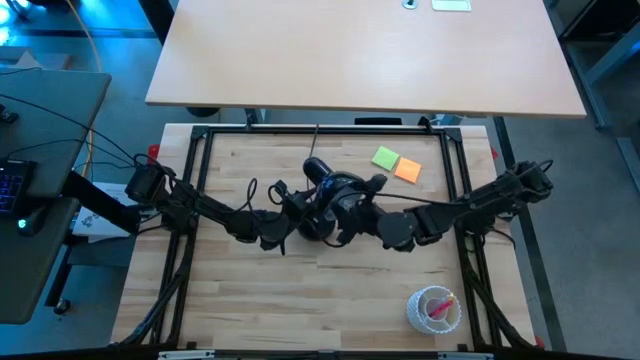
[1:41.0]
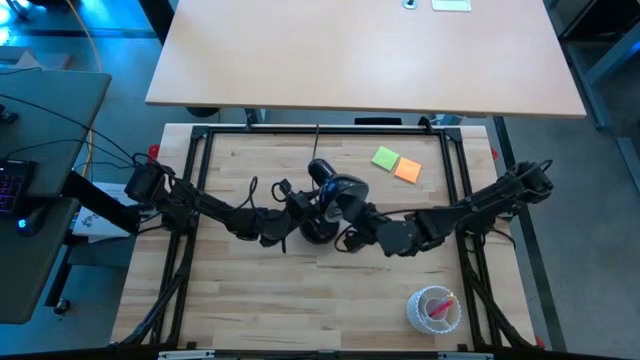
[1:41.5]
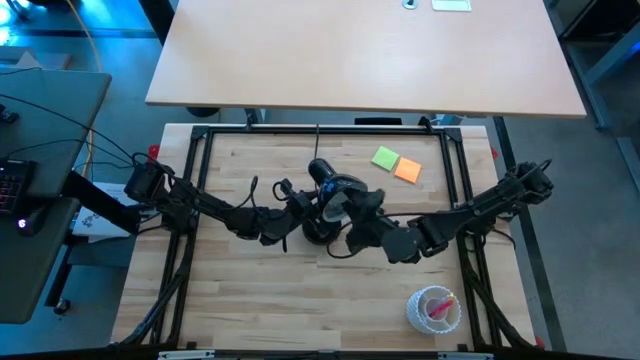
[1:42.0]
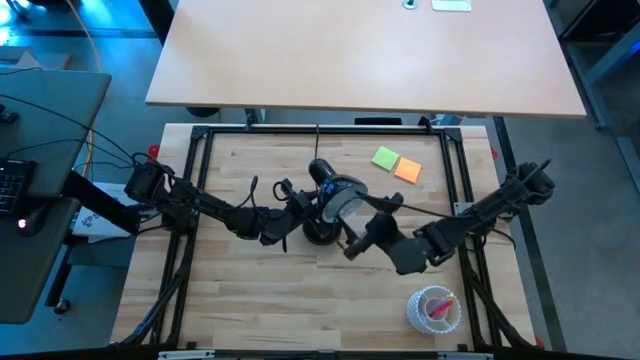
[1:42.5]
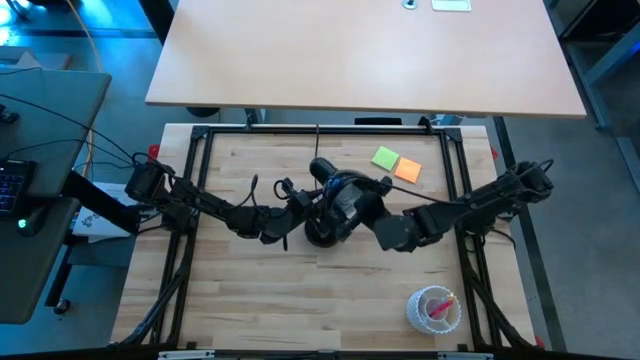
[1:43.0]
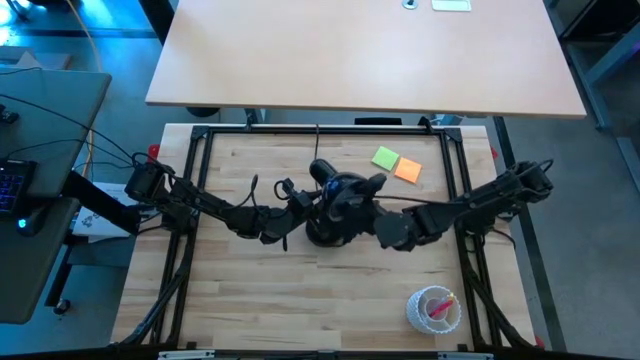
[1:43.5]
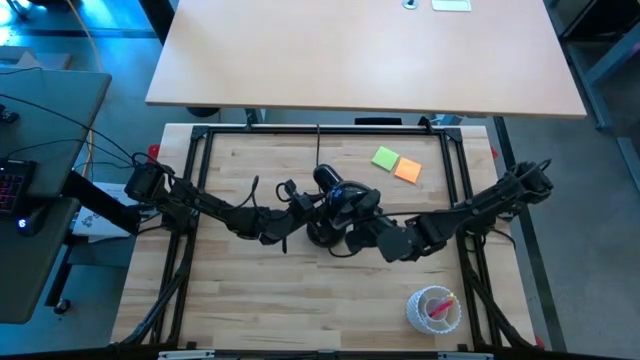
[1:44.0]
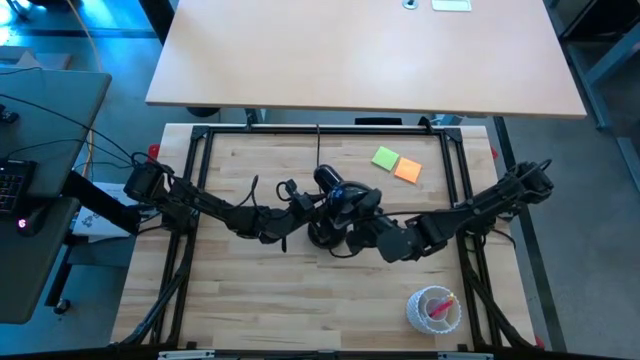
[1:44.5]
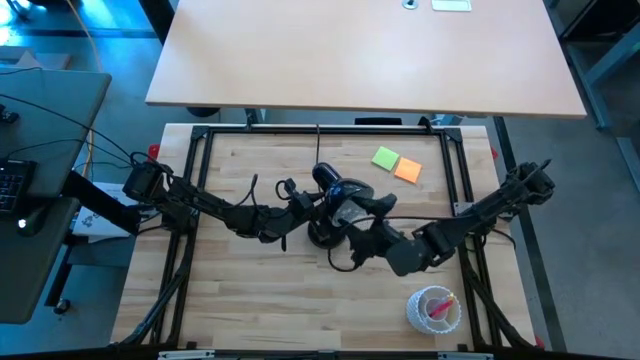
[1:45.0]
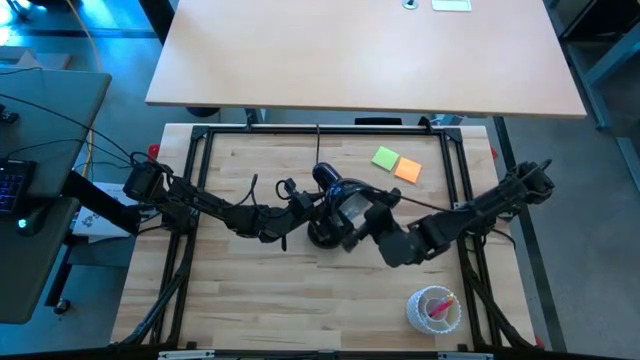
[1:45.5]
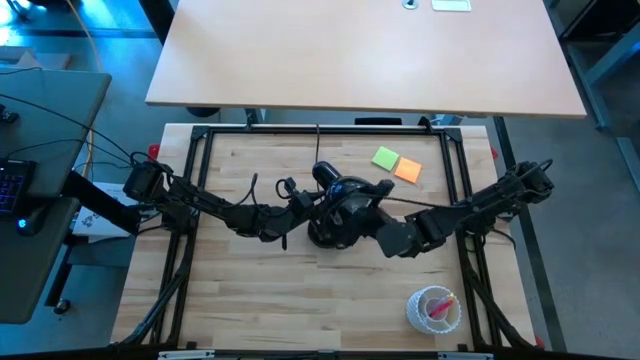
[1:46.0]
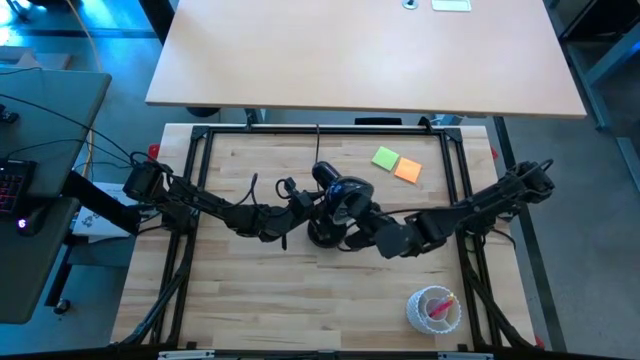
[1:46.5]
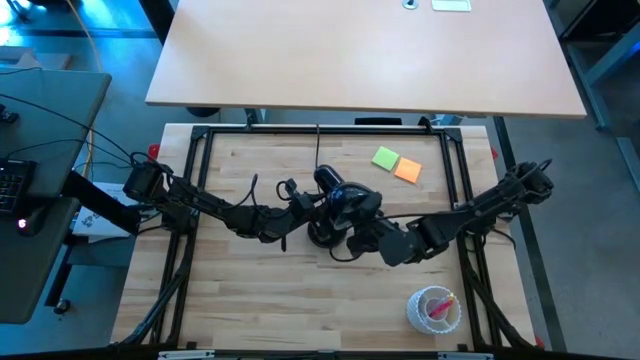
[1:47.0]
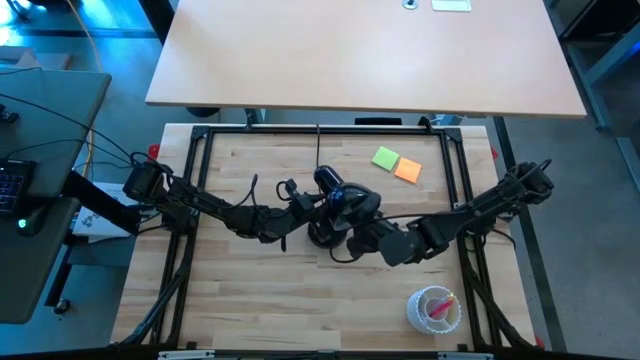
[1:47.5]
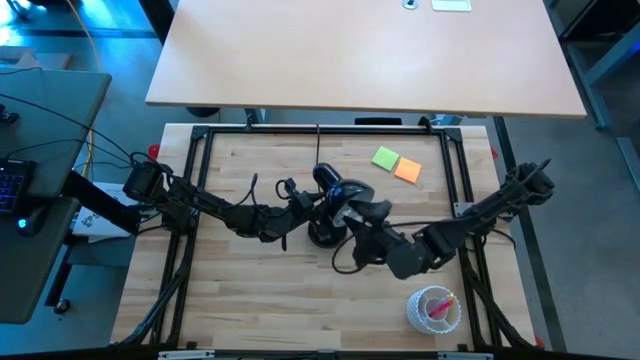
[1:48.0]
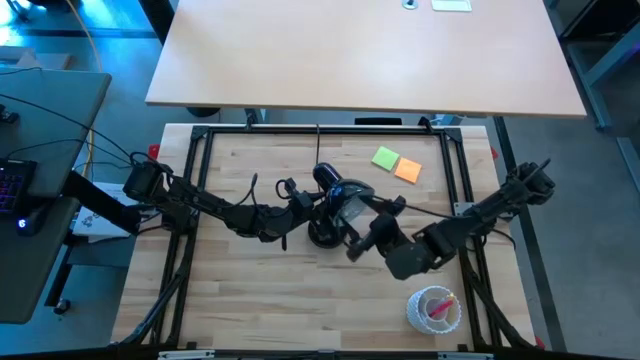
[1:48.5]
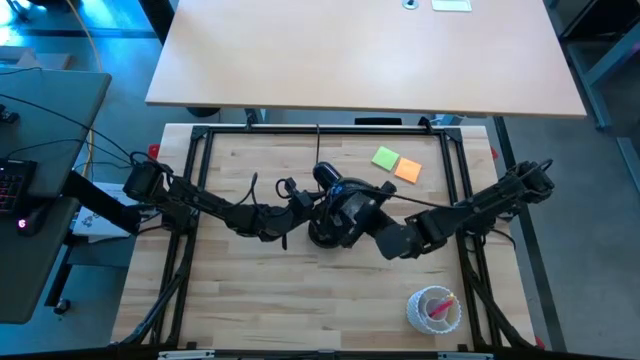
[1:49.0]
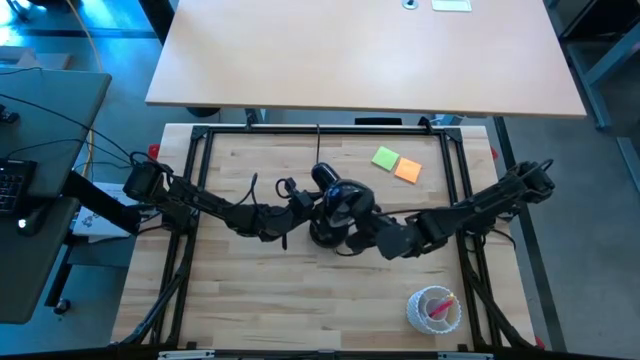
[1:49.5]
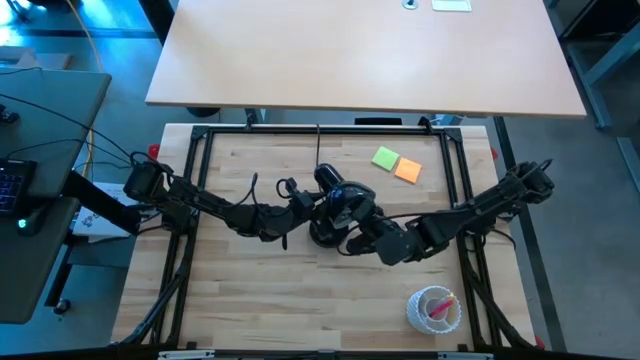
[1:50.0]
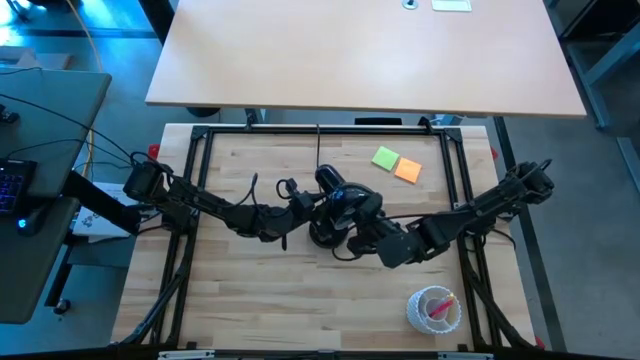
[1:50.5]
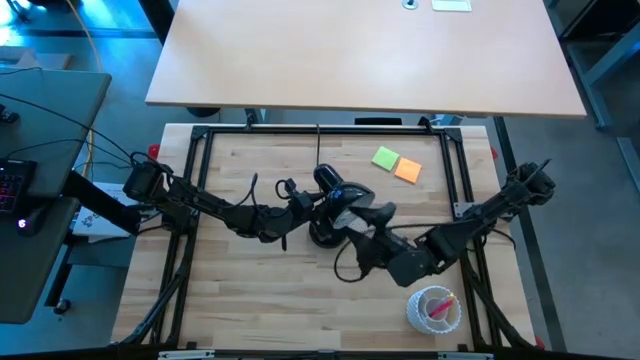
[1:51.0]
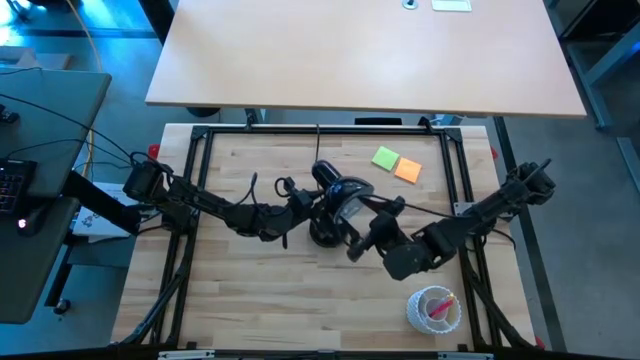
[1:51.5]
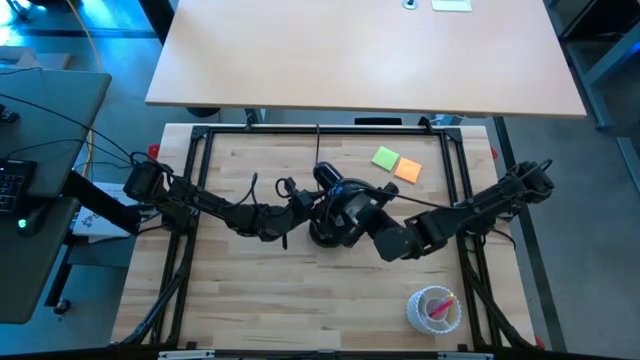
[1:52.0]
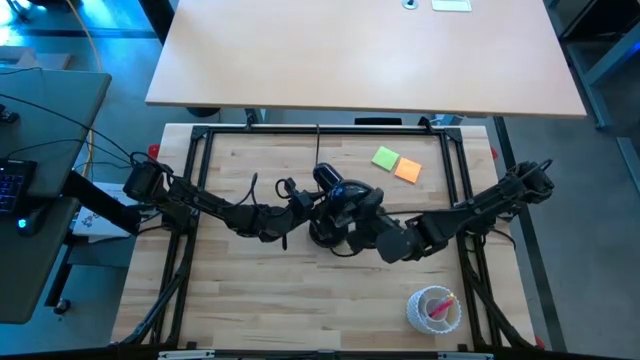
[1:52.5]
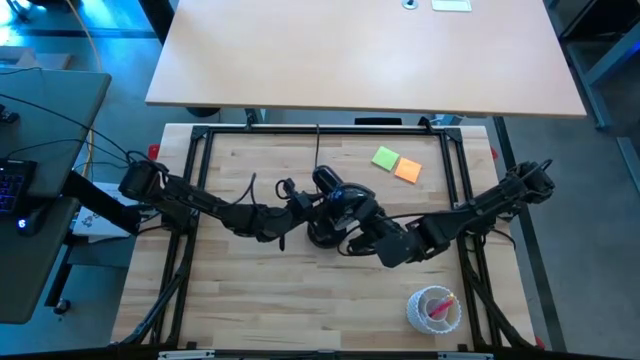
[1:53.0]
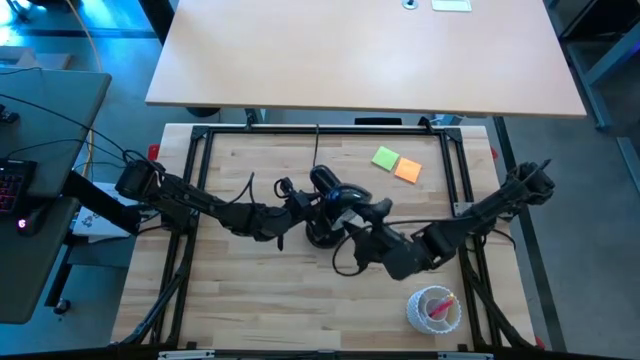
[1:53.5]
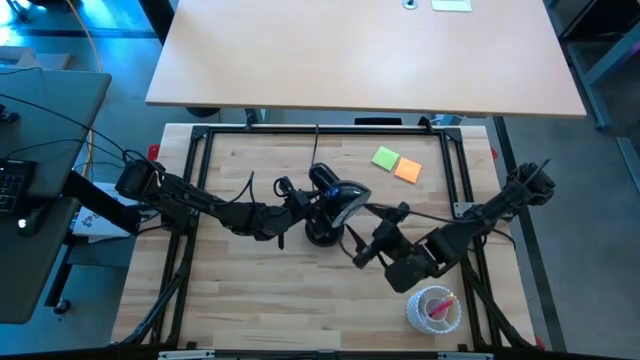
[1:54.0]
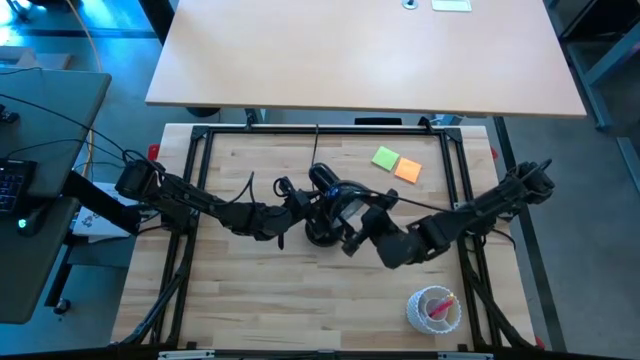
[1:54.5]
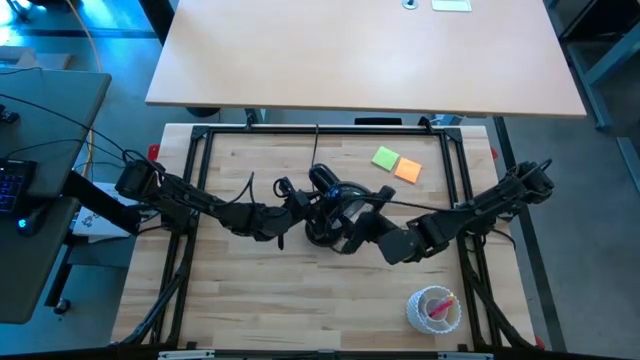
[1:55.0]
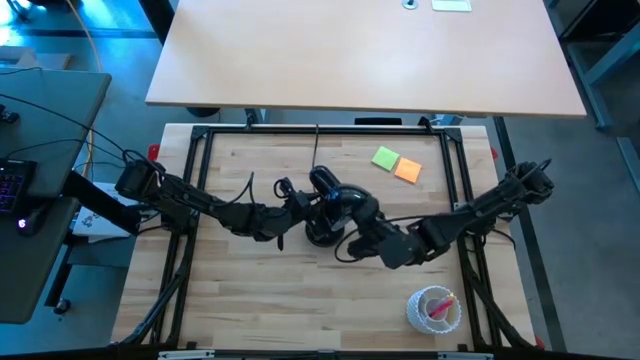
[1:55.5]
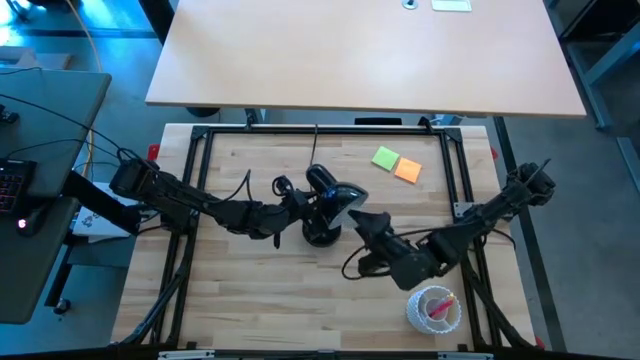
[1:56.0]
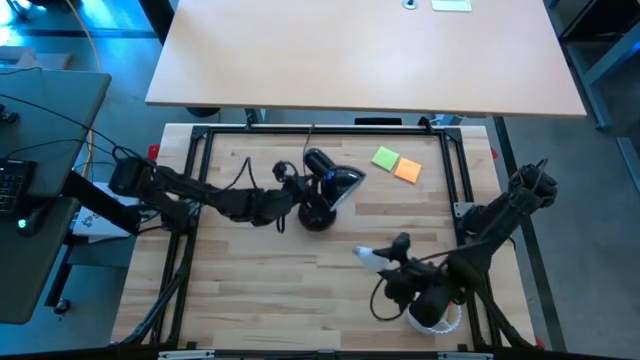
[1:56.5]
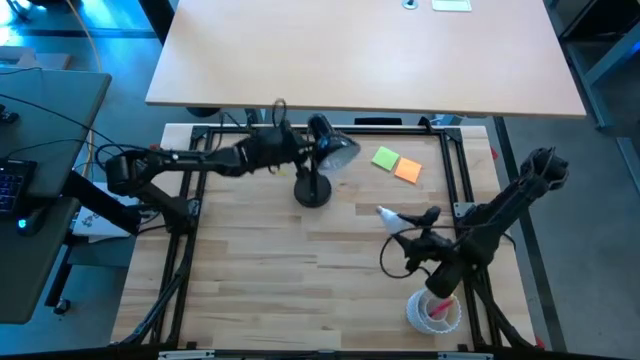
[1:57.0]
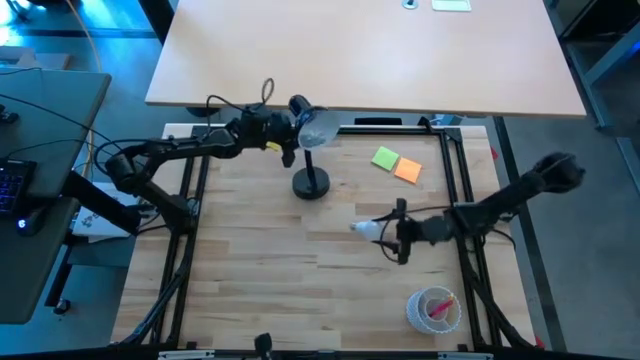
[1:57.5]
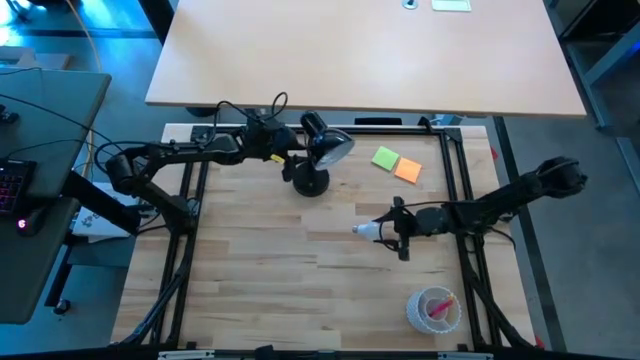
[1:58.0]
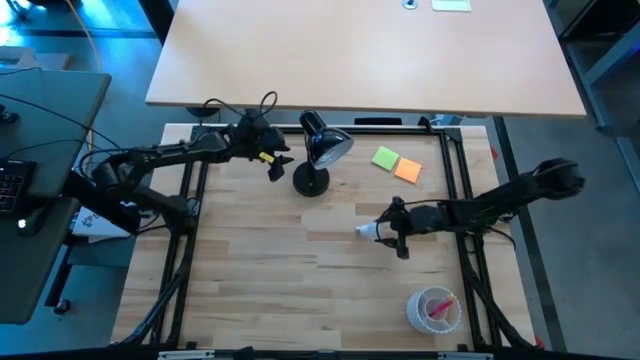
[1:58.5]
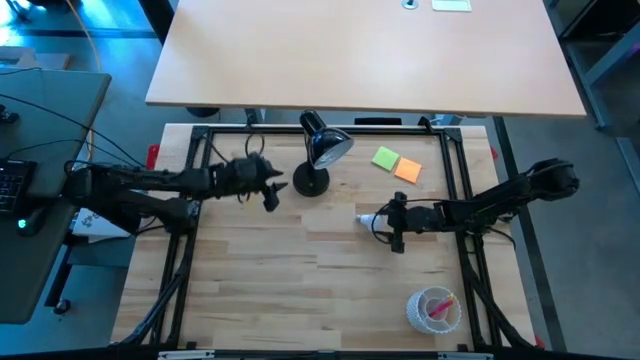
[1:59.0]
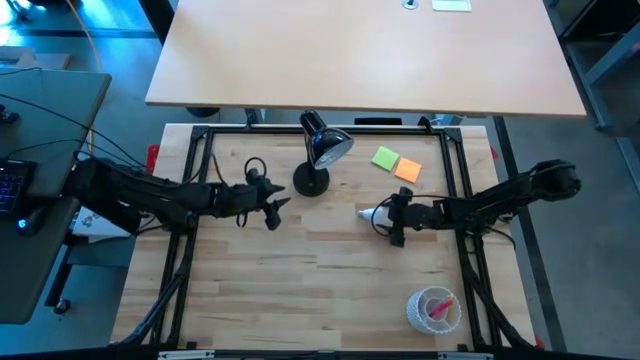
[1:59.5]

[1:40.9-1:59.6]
Task: Screw lightbulb
Remove the white lightbulb from the black lamp

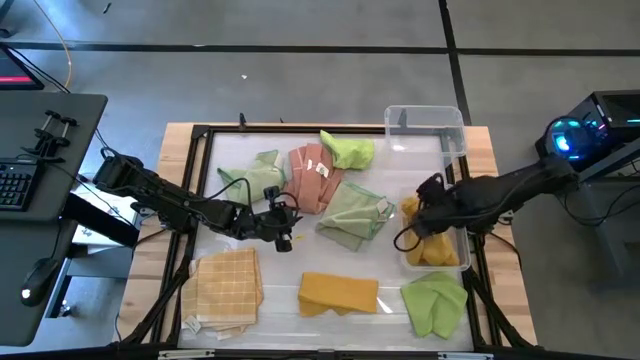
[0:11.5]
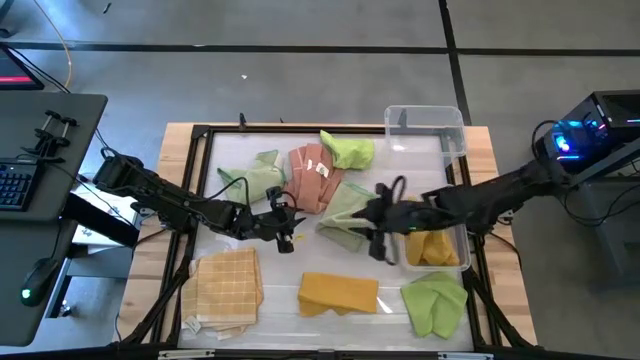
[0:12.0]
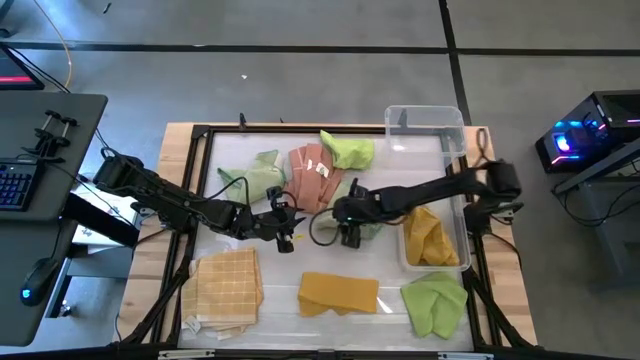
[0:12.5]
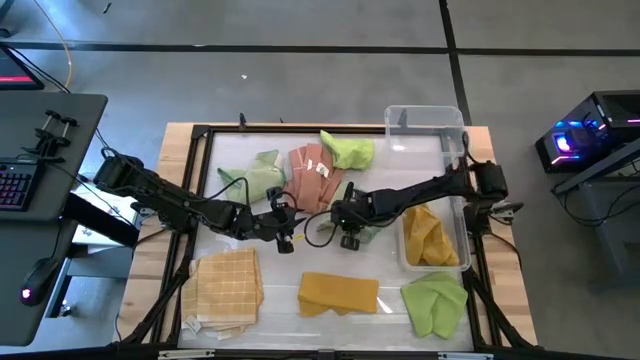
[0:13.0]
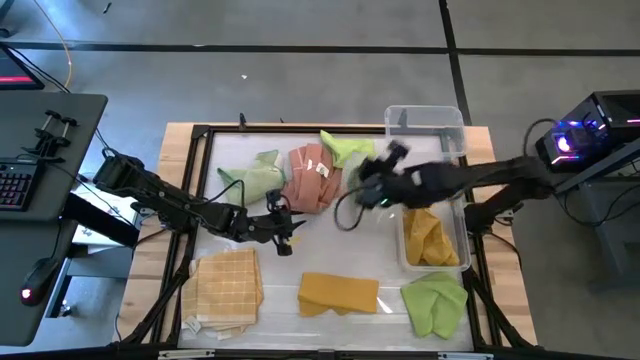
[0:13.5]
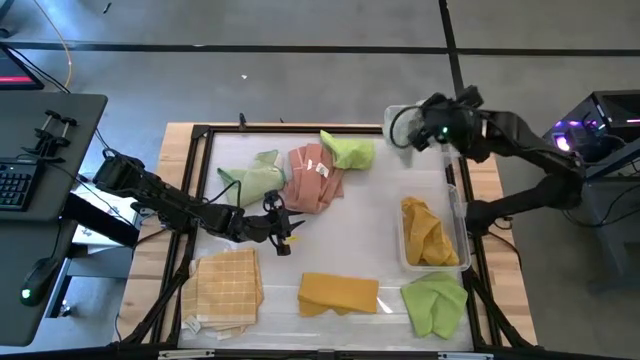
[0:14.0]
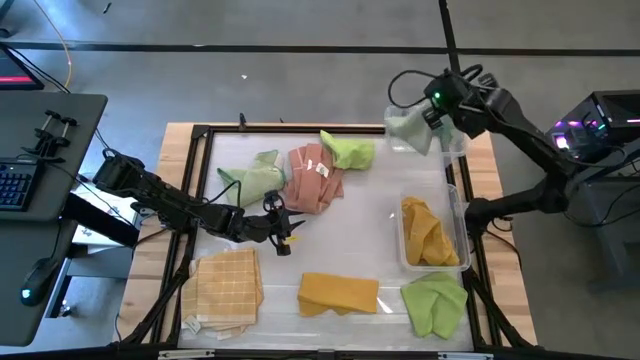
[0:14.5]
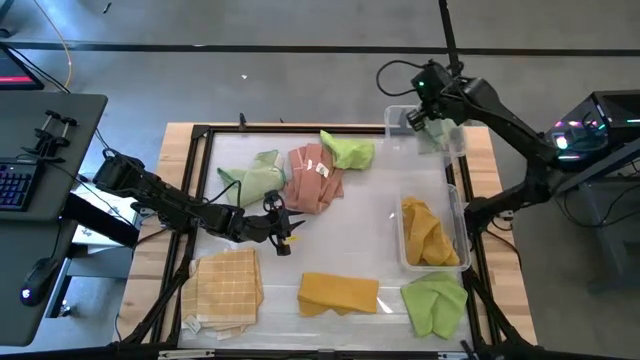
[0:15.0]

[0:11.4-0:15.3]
Task: Sort towels by color in basket
Put the left green microfiber towel into the top transparent bin
